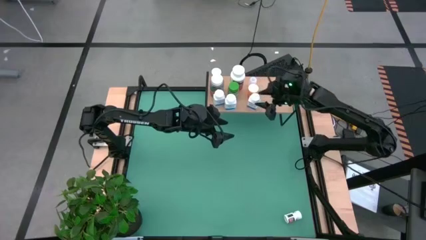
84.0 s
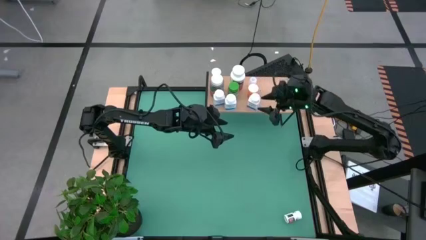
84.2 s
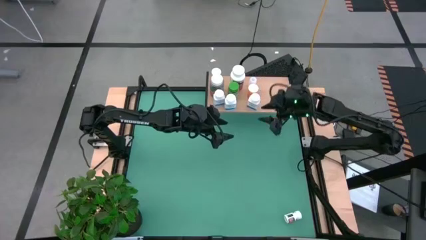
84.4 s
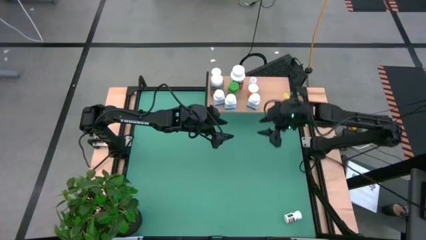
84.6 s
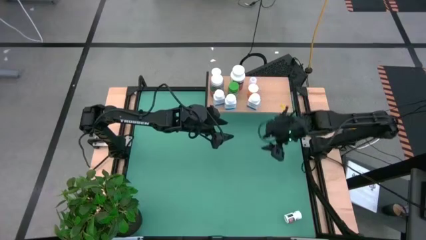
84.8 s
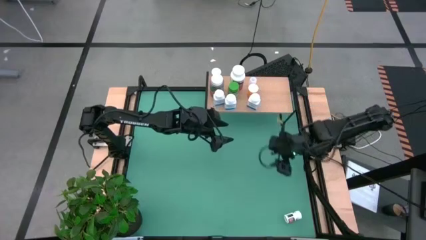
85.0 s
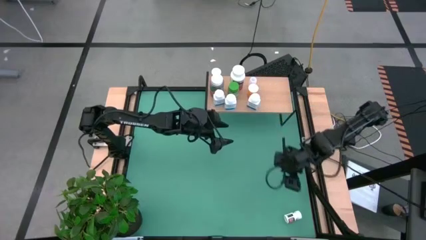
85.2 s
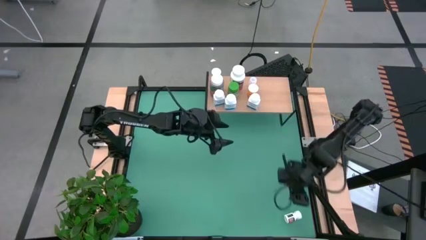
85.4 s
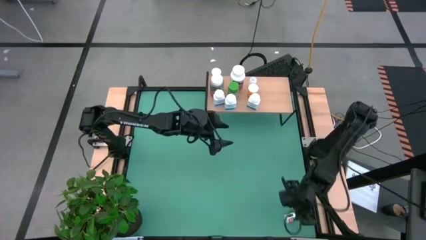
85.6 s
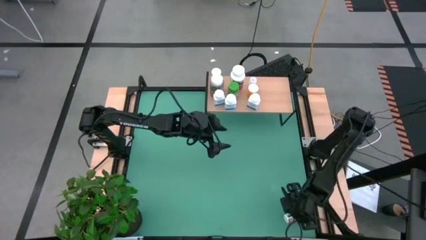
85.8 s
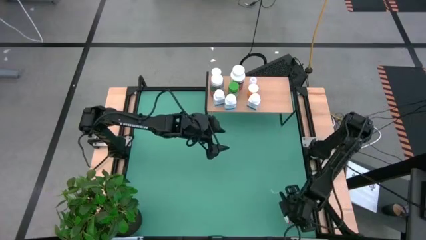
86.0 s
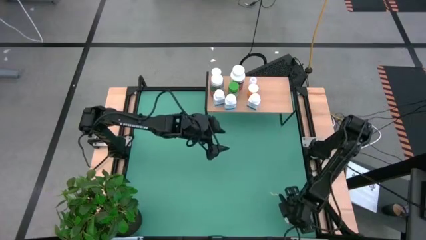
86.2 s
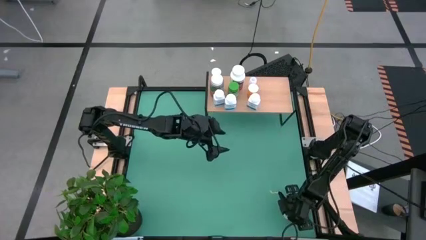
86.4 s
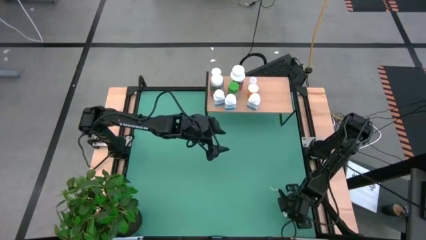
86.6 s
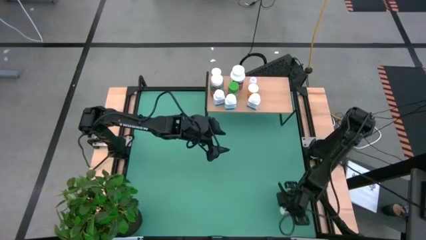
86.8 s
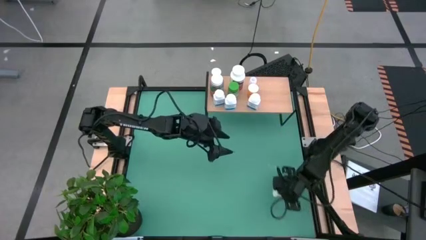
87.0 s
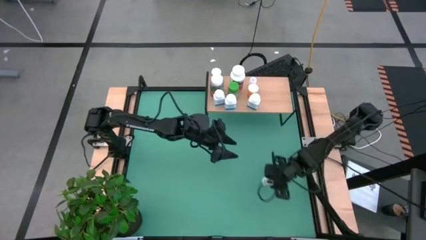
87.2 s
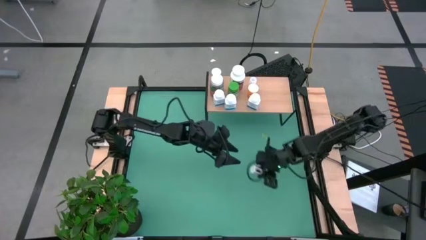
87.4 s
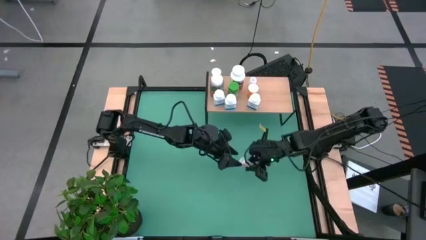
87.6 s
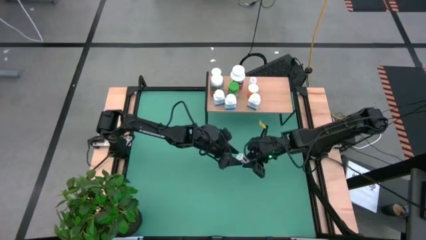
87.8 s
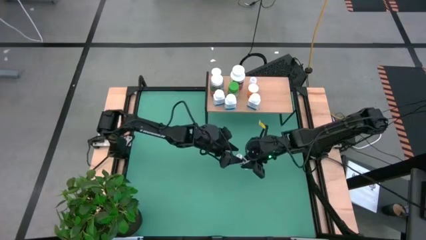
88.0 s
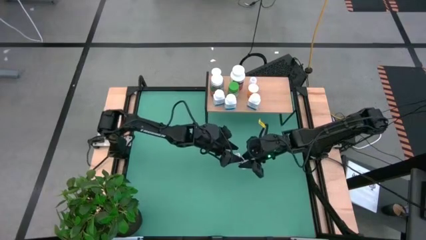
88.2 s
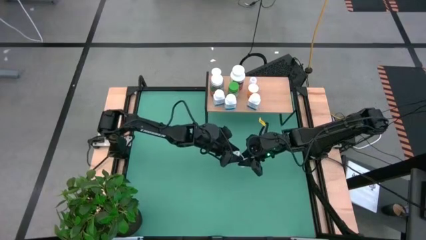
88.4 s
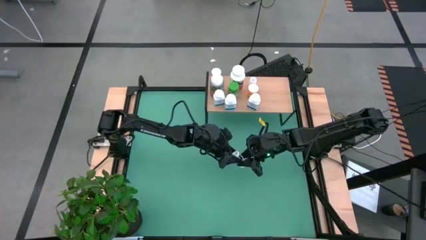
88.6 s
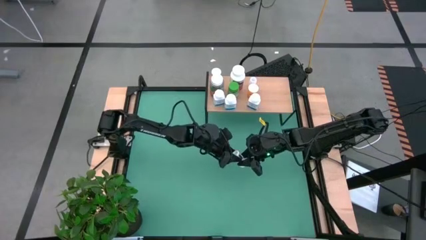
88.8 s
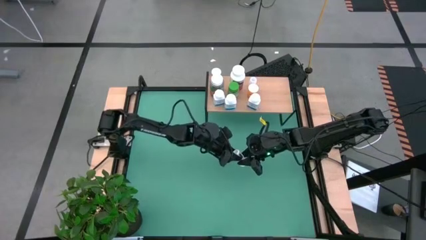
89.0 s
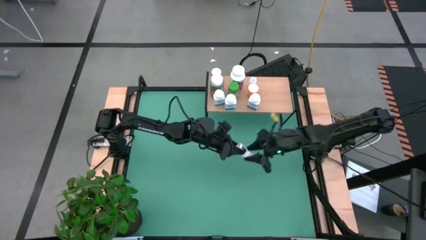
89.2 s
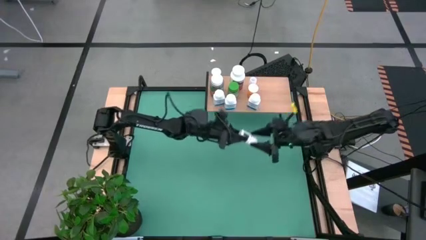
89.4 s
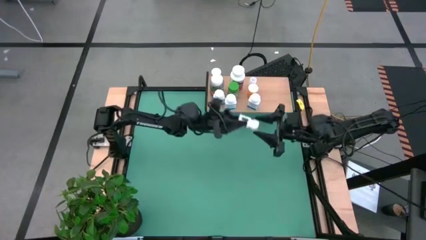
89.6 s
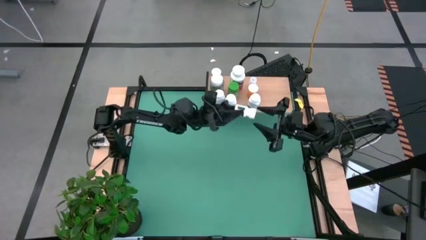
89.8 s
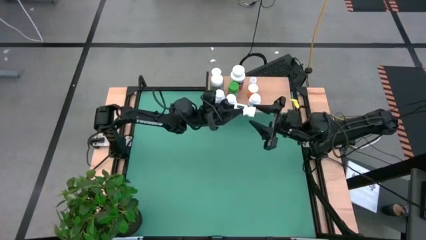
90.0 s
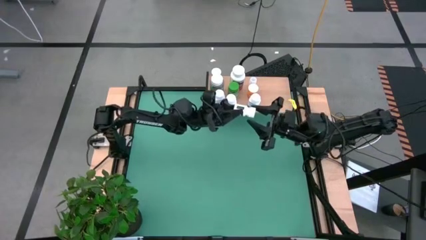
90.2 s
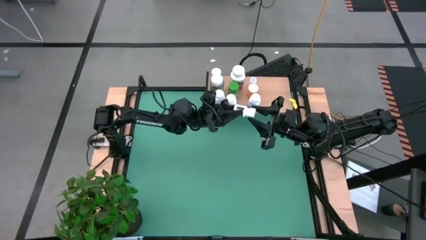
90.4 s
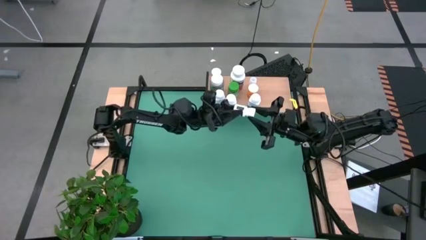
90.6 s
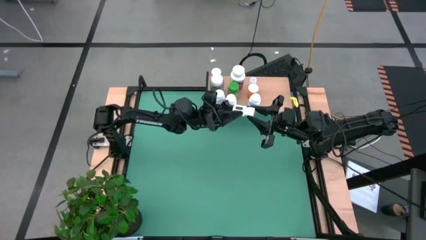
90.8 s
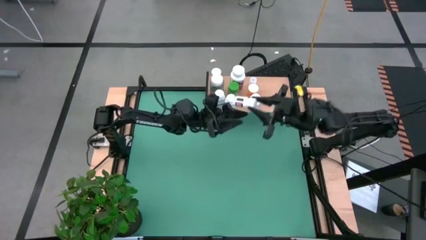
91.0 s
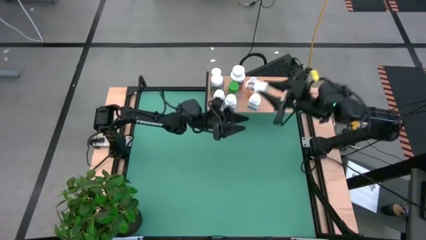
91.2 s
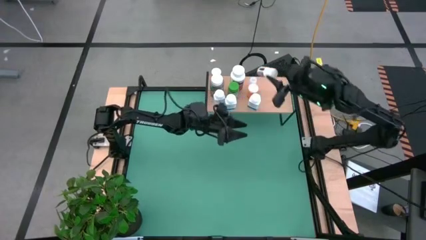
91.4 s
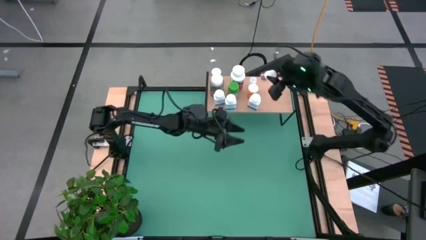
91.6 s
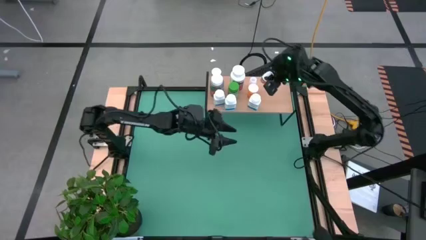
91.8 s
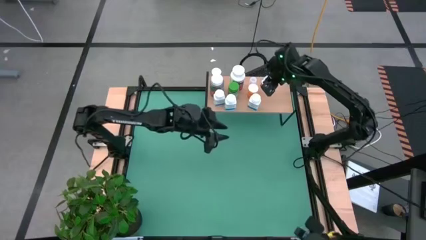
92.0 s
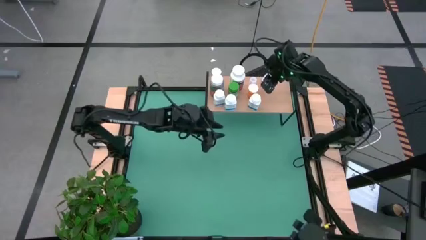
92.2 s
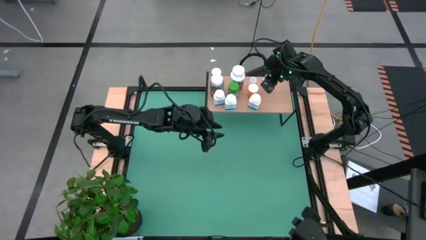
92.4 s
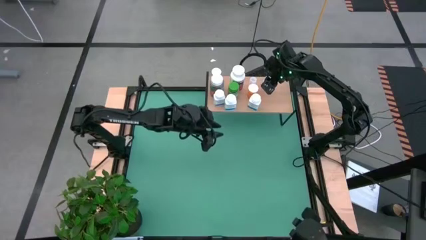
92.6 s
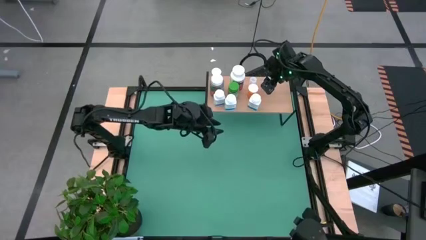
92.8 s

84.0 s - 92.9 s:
Task: Pick and place medicine bottles onto shelf by color
Put the white and black pill bottle on the shelf

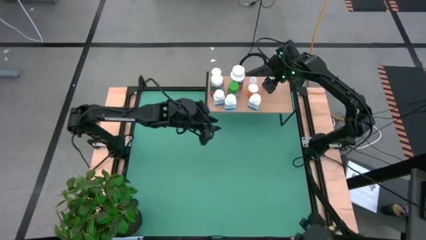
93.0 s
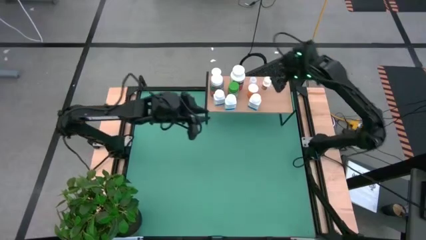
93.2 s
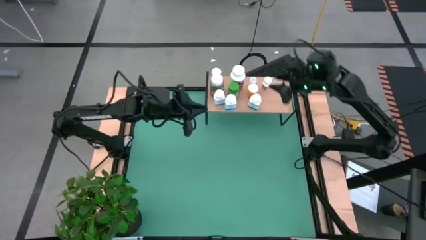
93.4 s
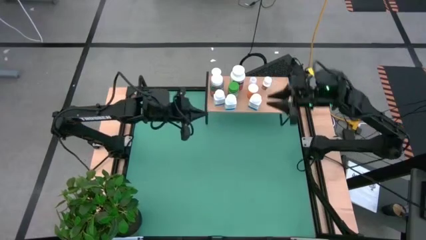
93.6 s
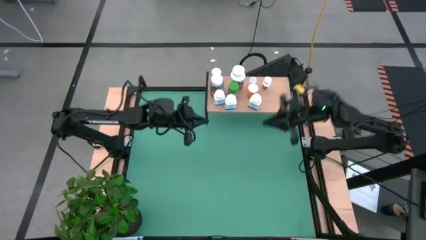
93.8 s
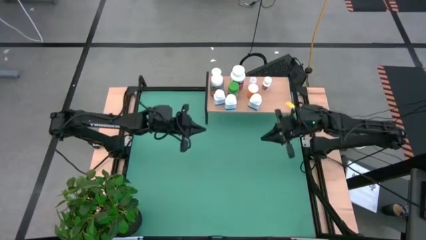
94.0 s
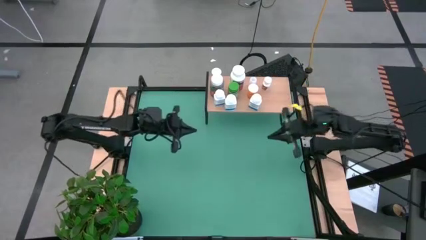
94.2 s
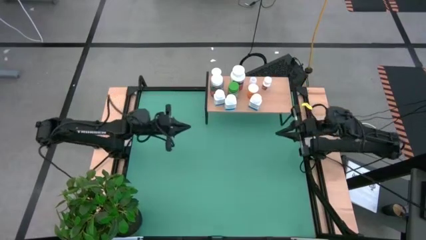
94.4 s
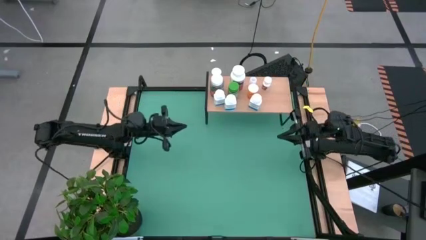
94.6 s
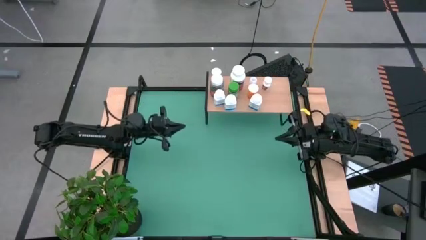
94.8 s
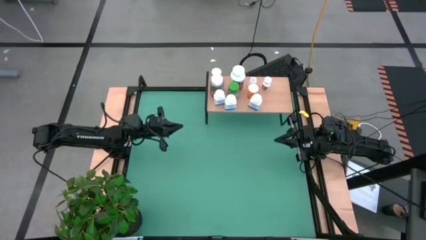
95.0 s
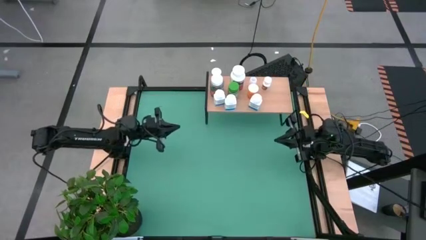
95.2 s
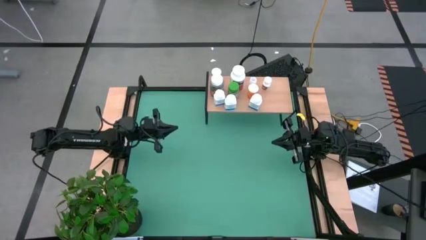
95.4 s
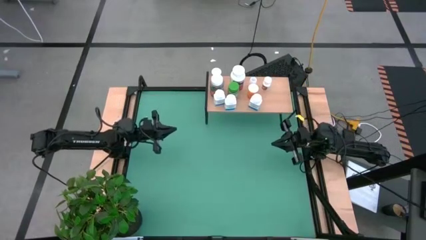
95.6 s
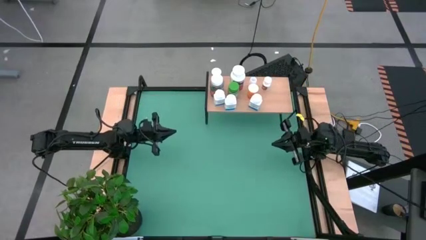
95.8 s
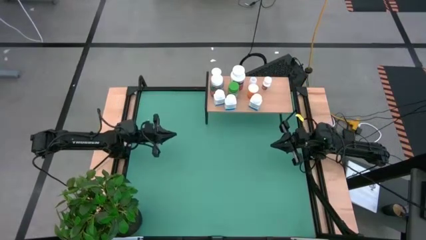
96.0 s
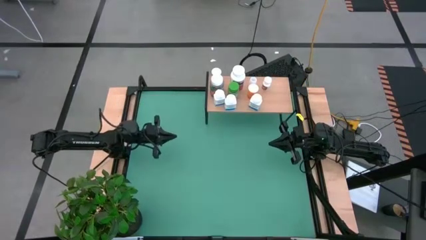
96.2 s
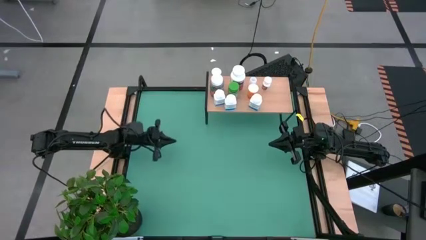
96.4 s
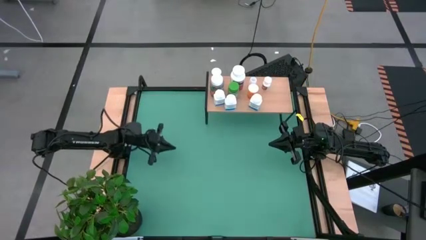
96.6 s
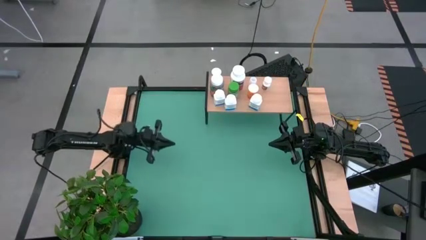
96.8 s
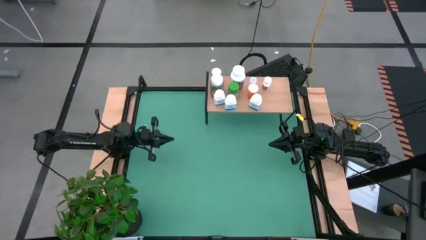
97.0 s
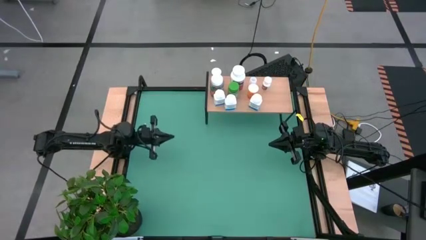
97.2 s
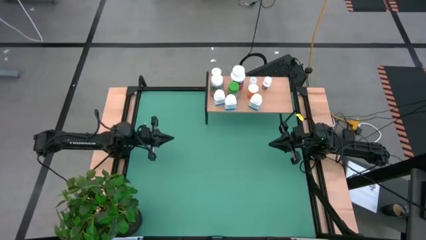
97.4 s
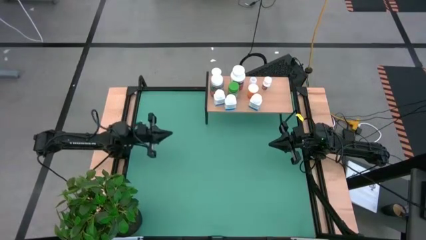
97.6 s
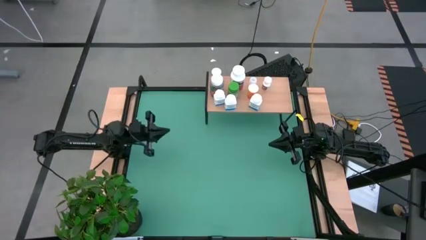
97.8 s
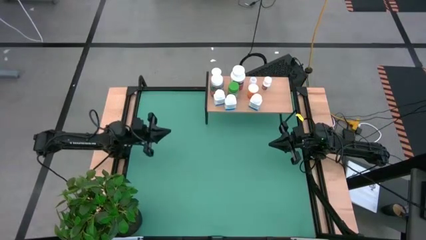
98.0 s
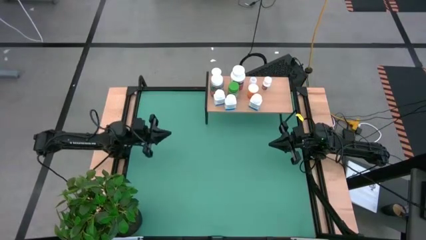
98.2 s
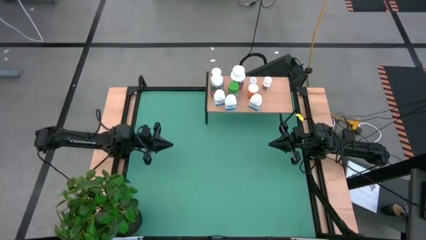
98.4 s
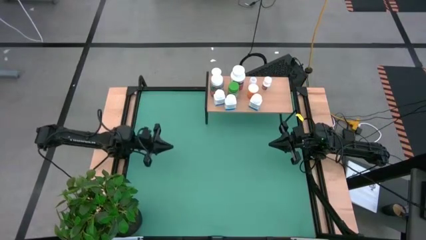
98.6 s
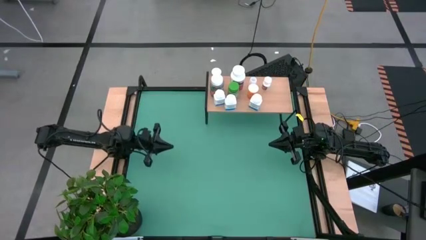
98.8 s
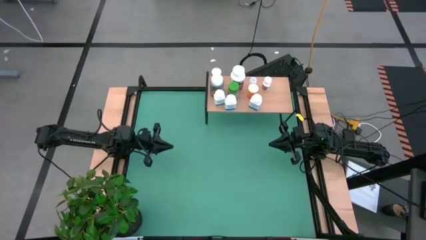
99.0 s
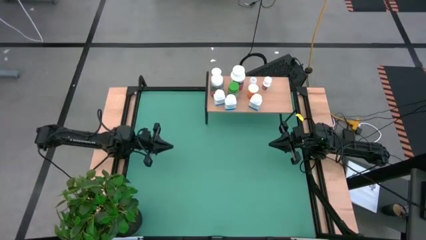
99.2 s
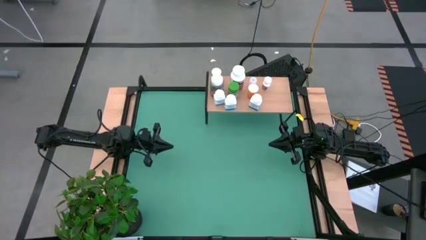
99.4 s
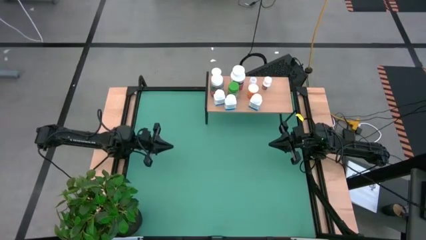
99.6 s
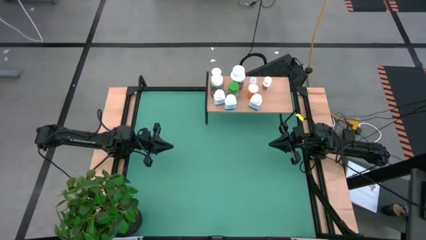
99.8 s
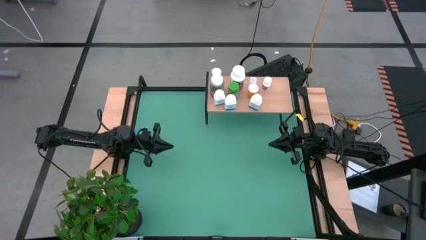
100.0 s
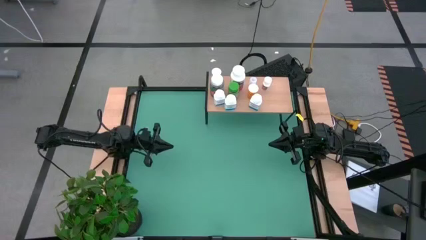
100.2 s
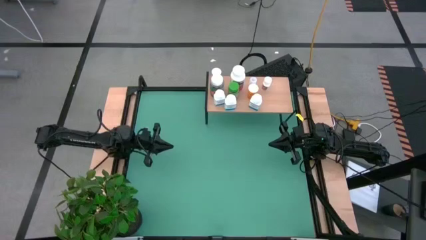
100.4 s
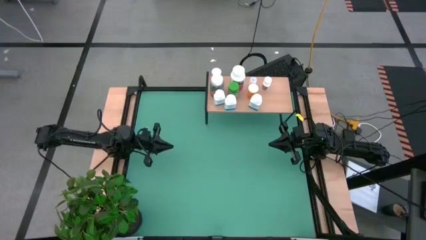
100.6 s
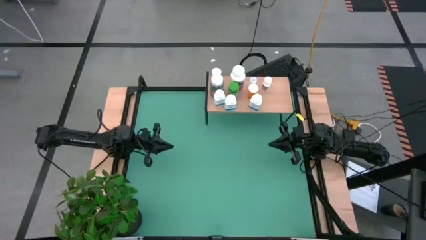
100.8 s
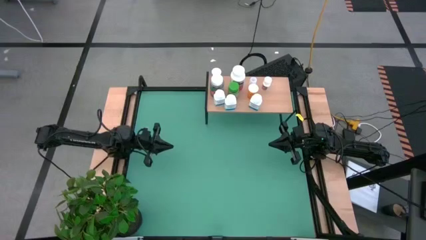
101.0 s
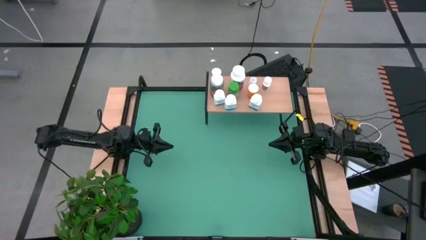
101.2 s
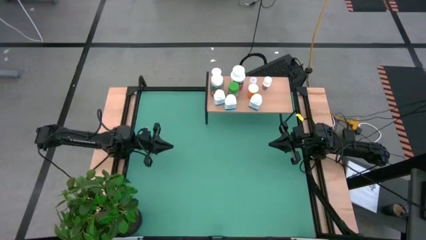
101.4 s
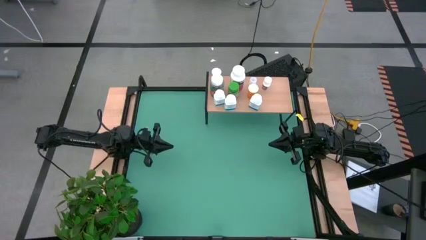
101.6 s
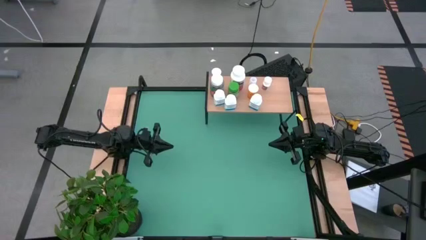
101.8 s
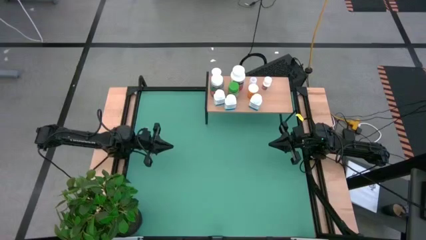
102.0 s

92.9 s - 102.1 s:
Return to Home Position
